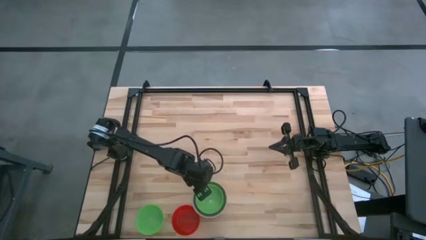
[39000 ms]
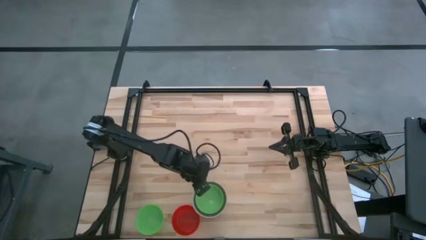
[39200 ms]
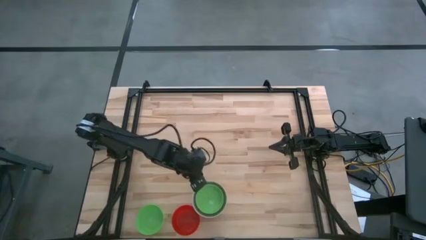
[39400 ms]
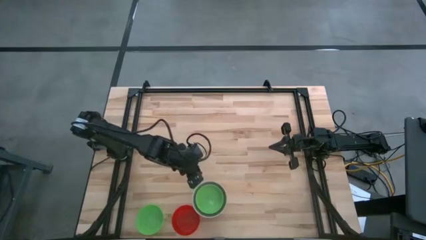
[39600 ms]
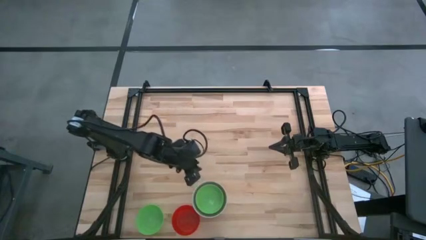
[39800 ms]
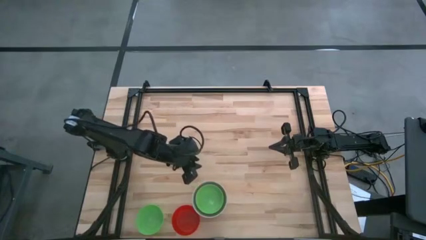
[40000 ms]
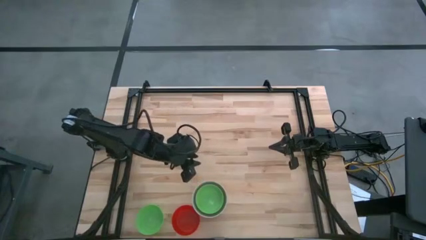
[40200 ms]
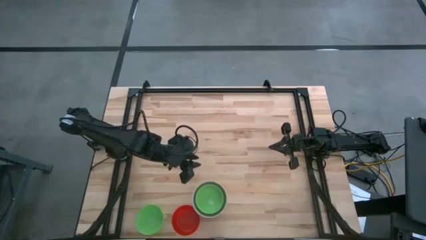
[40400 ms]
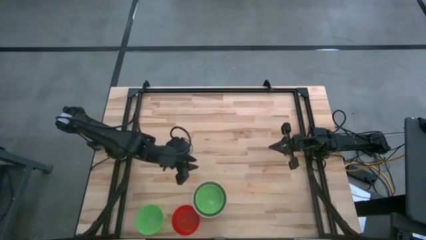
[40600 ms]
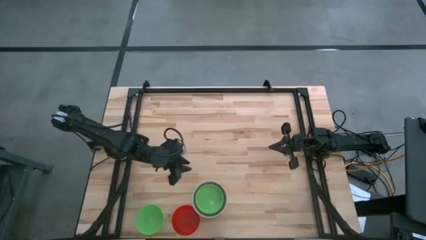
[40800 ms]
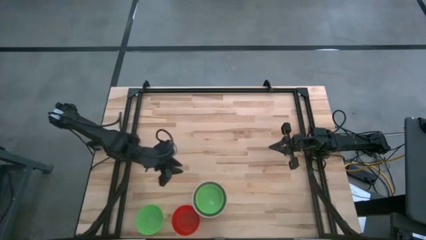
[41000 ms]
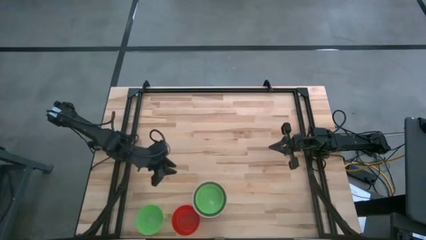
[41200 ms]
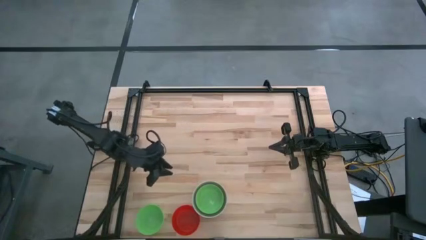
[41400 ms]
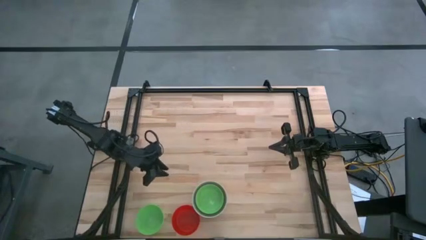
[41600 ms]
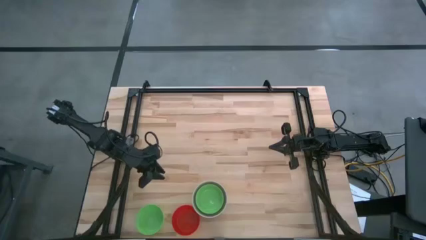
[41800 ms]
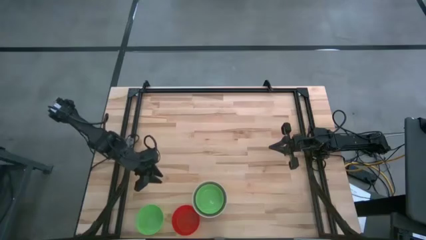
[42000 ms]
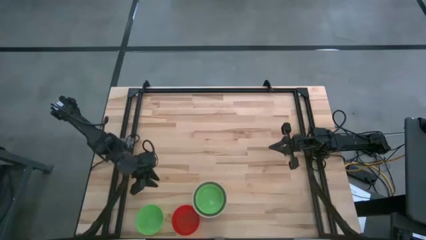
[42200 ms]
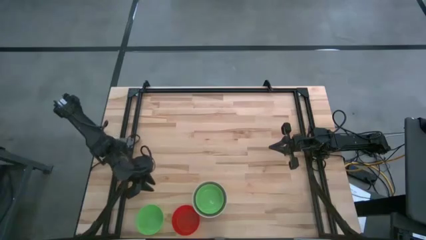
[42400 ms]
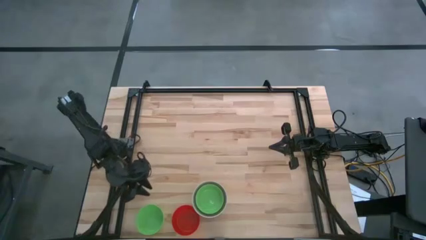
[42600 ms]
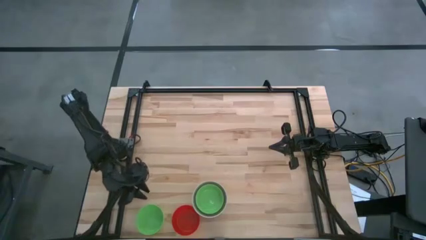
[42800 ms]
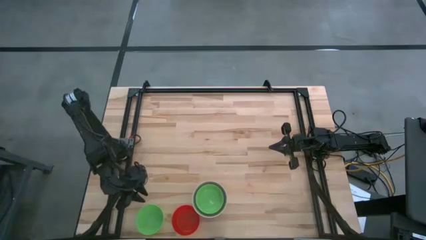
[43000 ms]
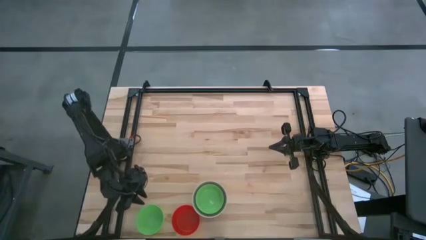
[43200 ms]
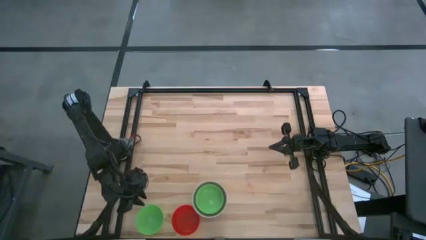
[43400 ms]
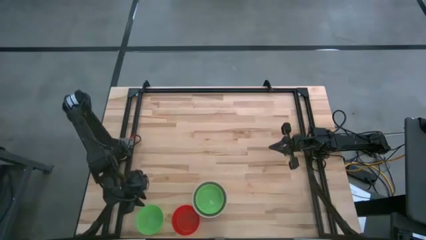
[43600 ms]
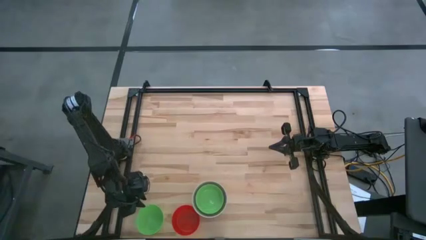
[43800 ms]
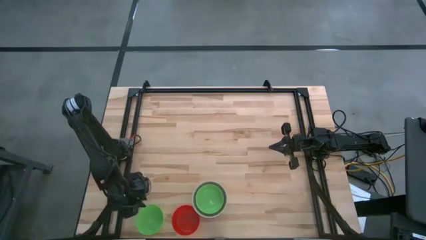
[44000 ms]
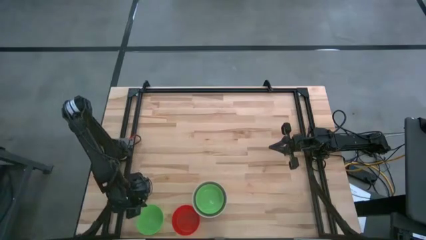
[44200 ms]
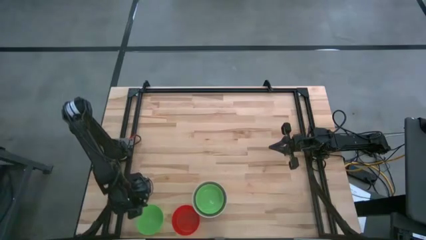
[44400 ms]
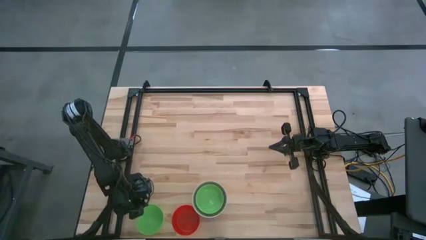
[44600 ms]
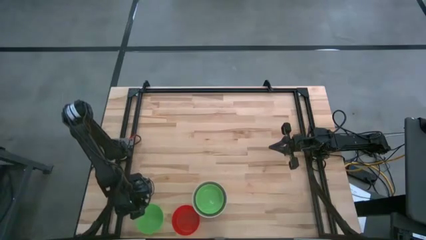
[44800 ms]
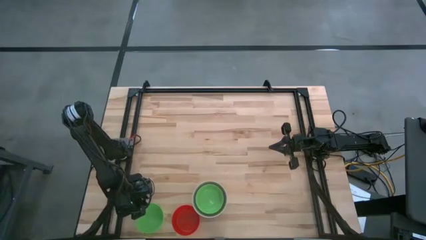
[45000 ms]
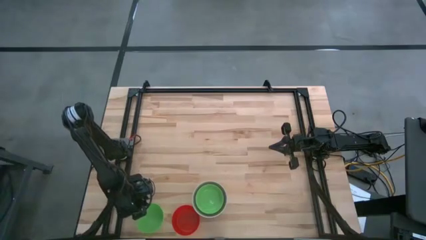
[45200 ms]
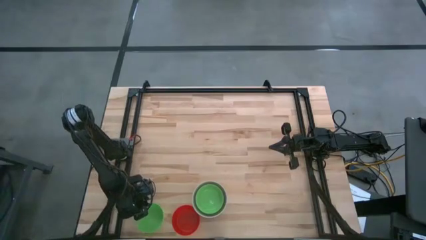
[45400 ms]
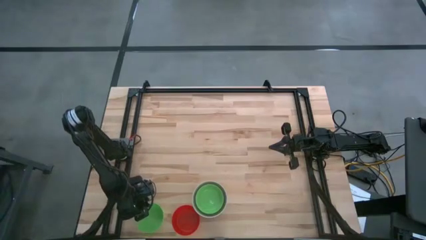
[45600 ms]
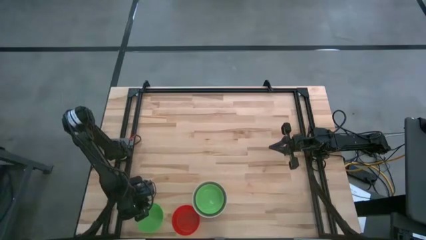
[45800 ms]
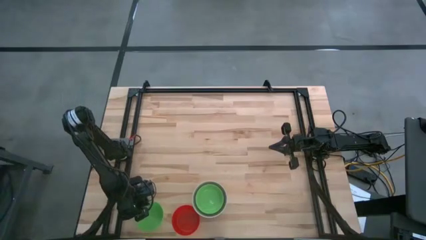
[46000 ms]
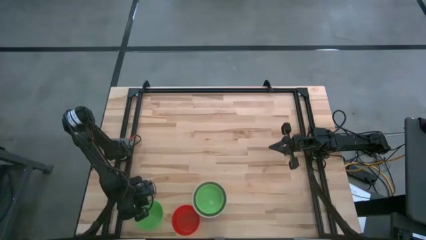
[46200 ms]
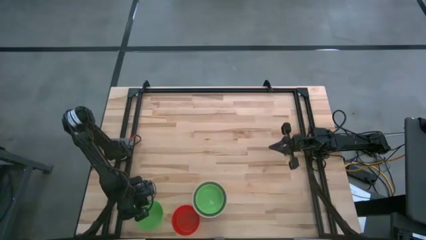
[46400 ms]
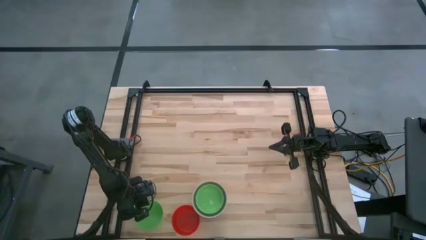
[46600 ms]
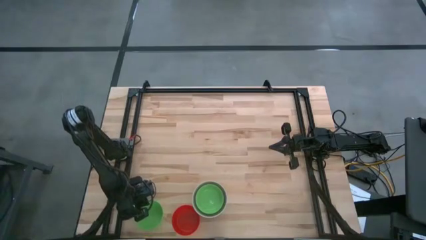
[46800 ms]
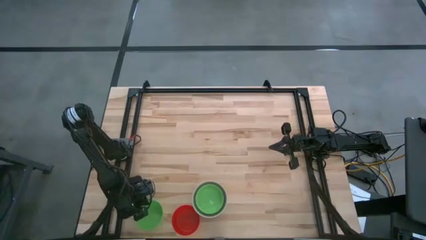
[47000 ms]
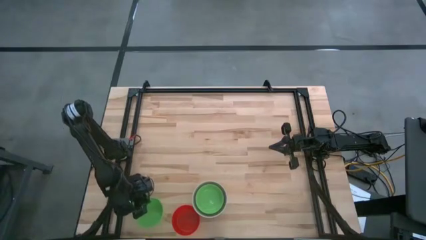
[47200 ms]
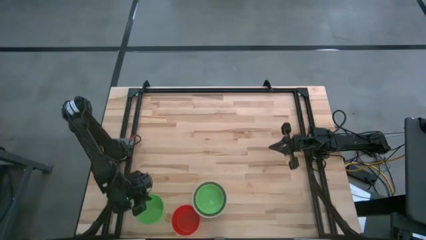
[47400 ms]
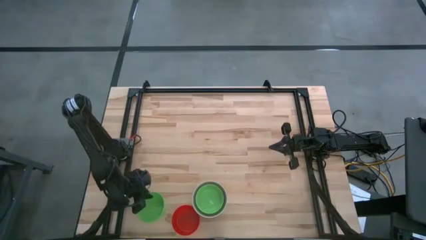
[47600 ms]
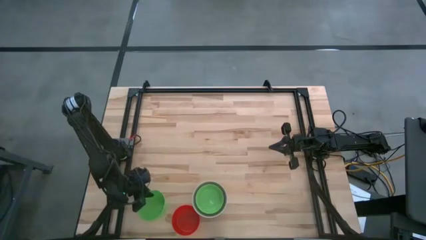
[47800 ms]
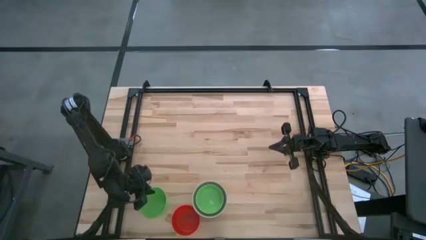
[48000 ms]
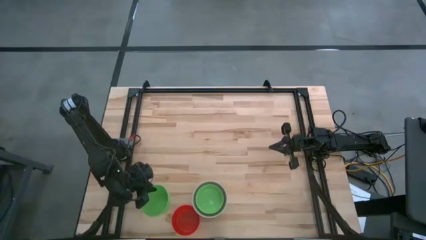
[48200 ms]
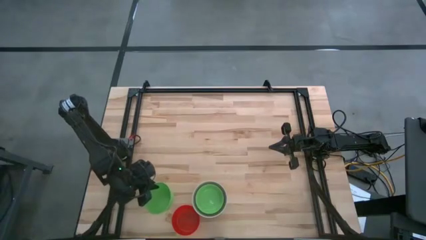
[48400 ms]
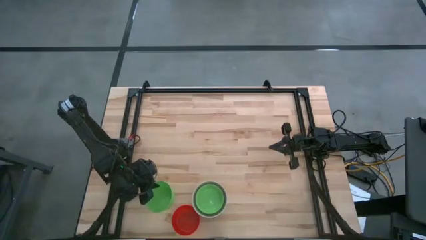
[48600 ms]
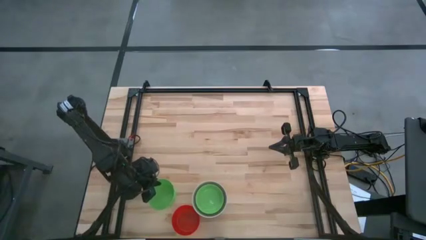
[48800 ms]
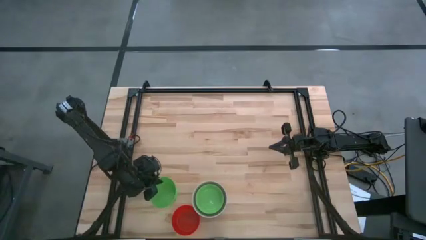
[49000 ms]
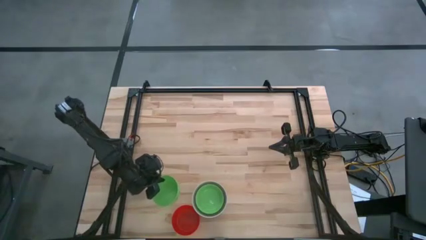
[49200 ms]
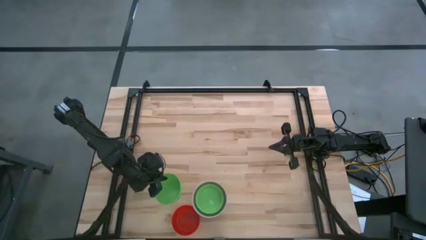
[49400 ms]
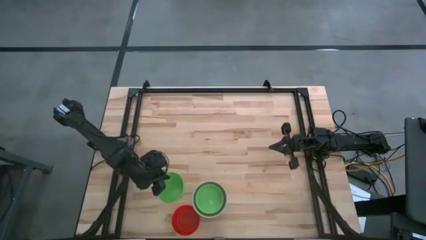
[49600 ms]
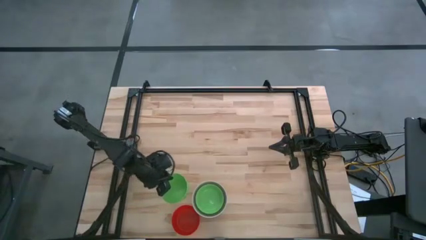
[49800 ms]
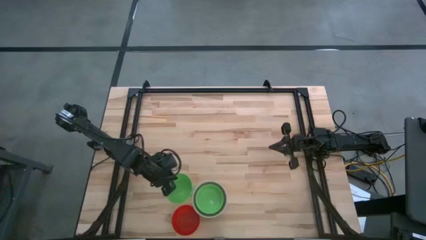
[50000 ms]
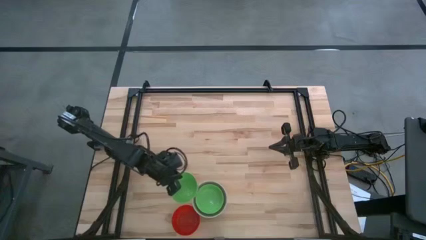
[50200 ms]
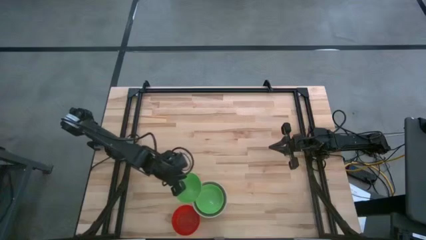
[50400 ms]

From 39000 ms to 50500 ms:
Stack the green bowl on top of the green bowl
